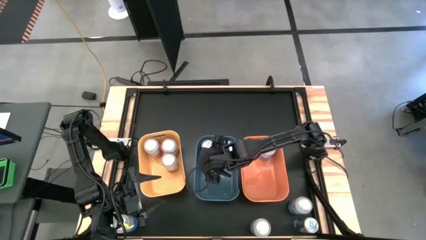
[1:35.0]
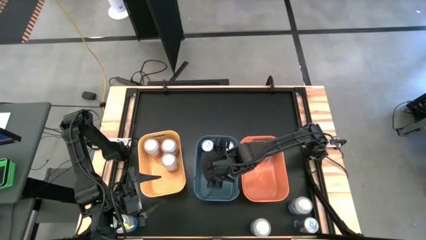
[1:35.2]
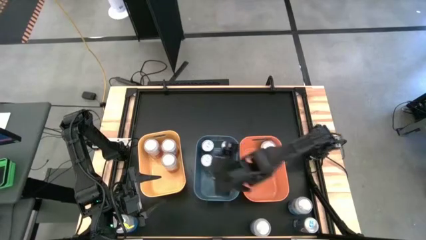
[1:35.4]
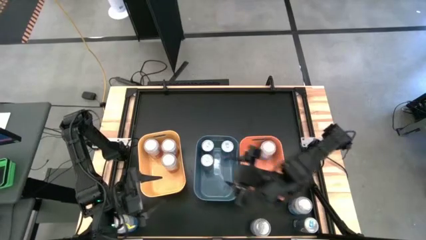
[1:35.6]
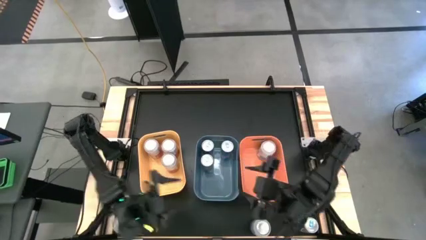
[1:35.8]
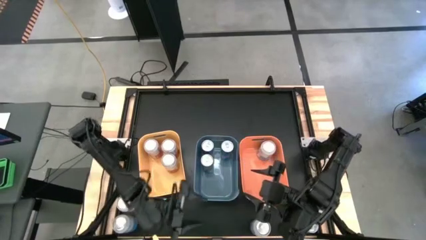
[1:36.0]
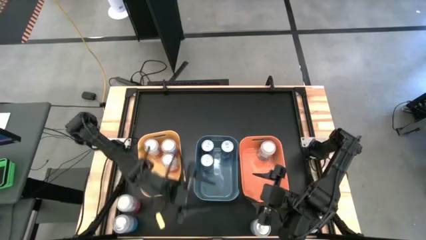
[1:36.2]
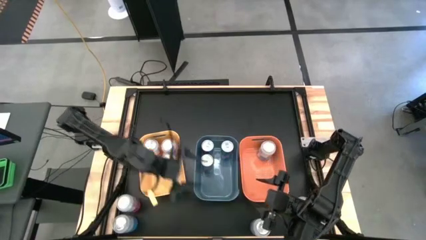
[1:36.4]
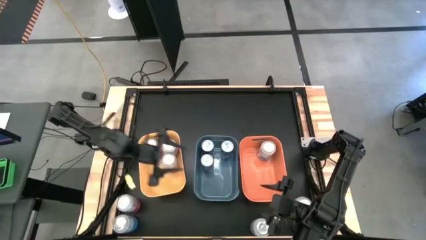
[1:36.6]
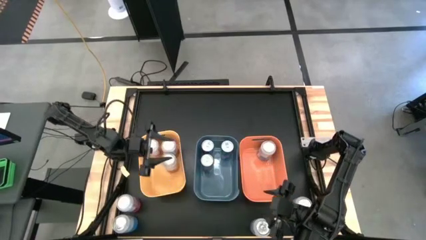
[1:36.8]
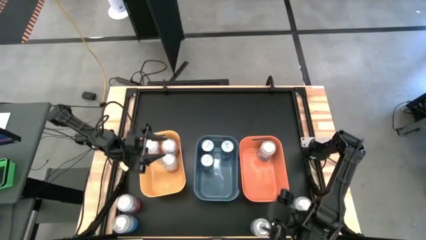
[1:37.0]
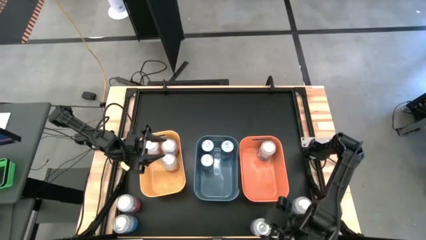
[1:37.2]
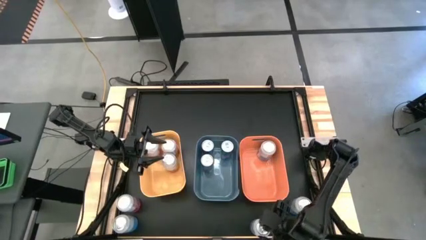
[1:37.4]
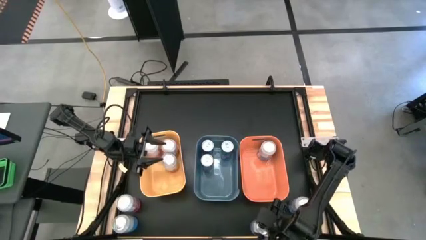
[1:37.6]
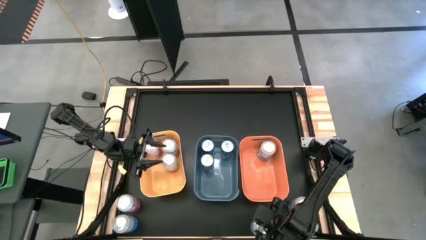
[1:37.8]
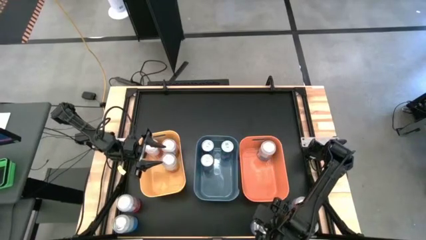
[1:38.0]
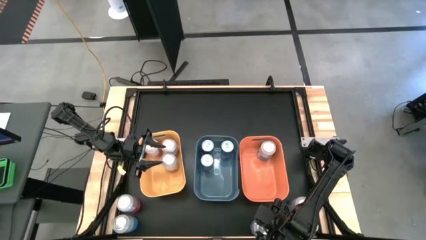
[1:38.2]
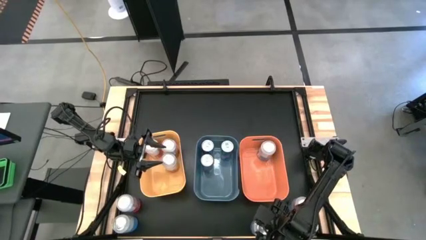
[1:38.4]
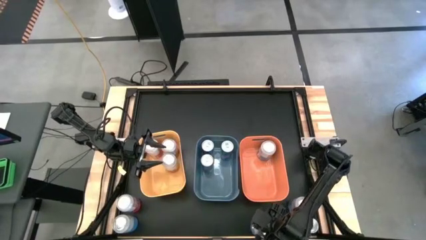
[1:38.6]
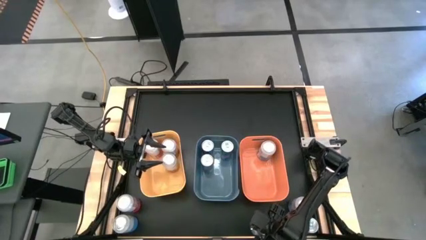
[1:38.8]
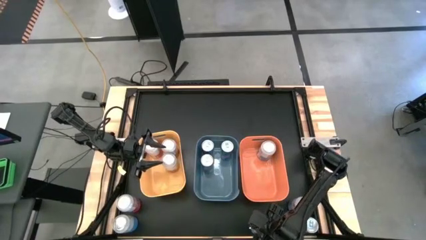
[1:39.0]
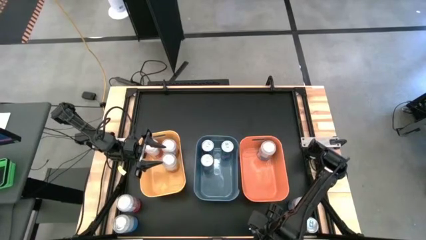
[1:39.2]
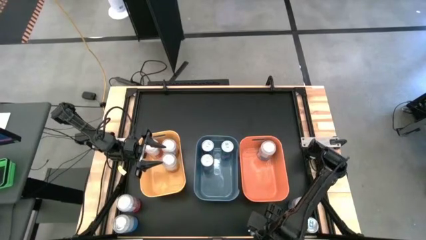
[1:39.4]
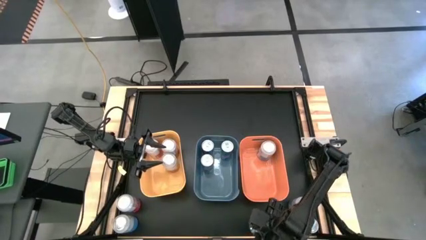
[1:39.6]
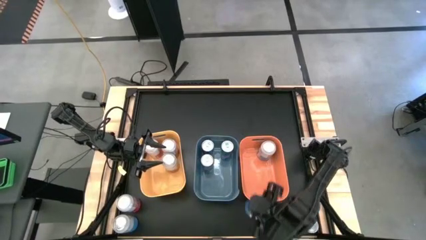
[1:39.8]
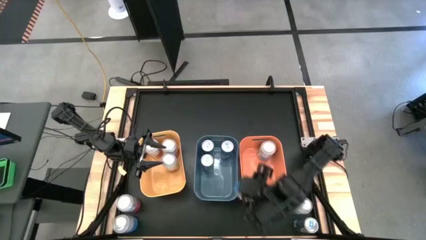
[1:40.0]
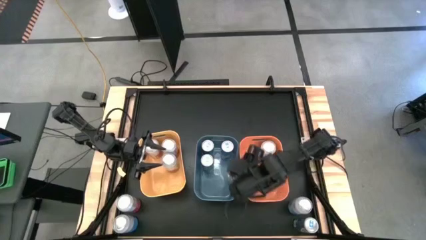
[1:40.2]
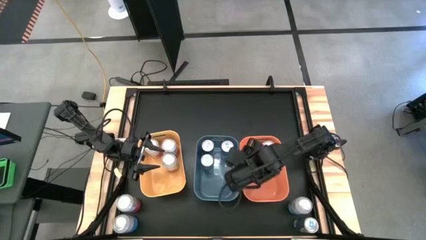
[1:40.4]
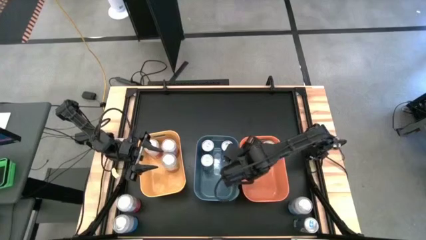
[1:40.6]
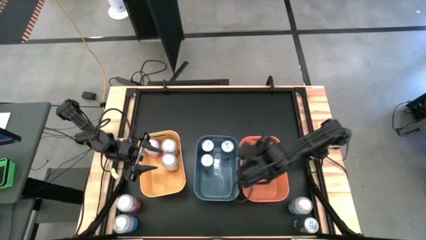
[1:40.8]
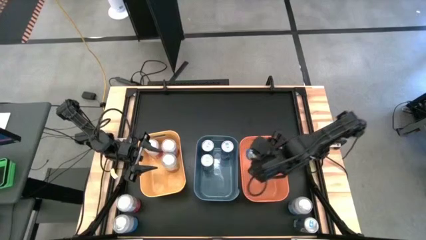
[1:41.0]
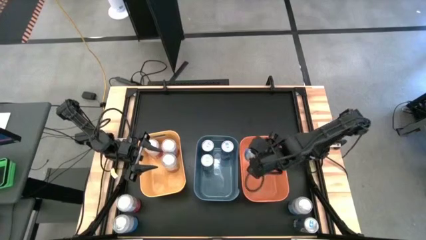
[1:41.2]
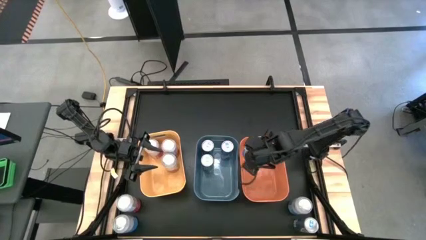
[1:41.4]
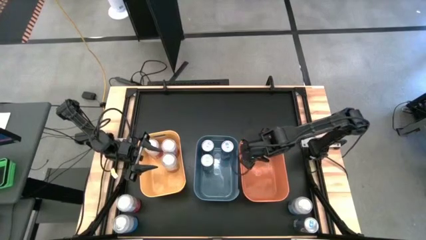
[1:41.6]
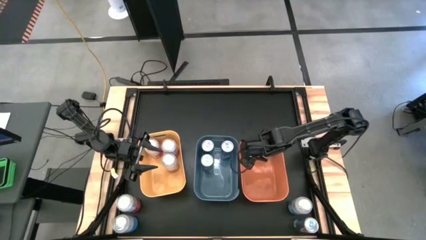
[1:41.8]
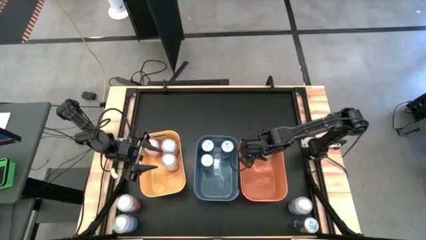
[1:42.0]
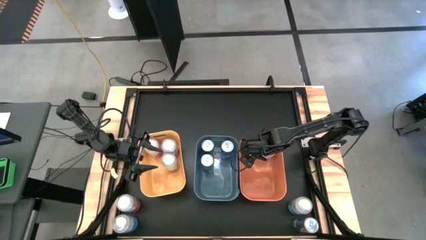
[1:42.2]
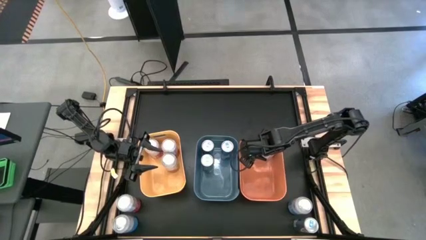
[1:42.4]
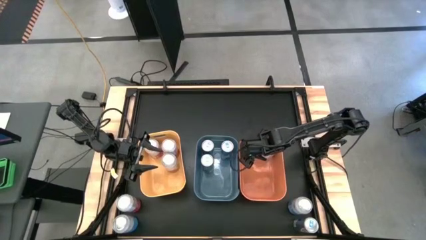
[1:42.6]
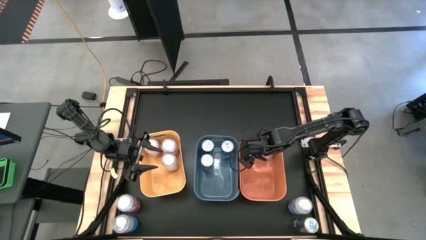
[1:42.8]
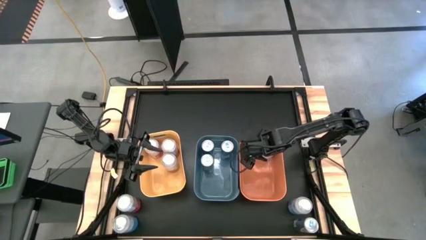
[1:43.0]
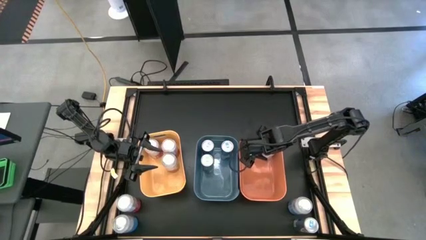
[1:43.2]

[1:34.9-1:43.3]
Task: Sort soda cans
Put the bottom right blue-white soda can into the orange bin

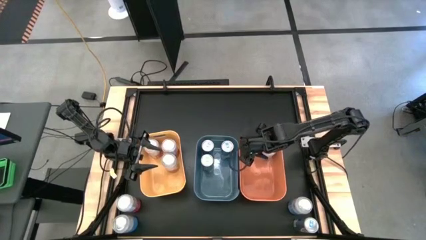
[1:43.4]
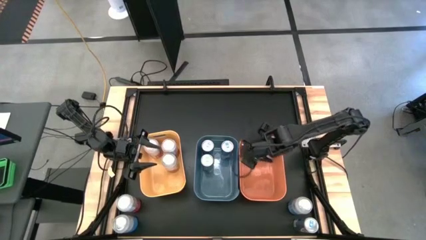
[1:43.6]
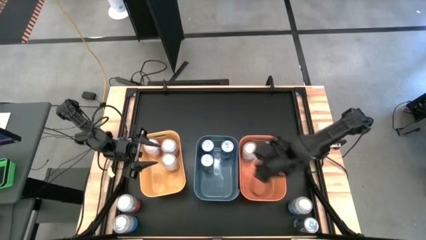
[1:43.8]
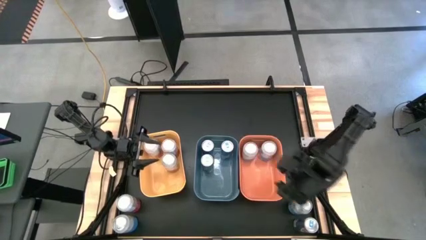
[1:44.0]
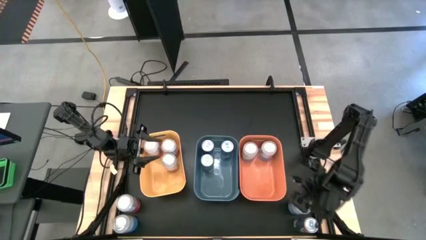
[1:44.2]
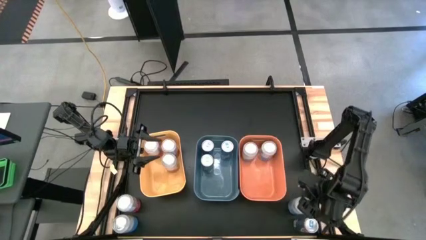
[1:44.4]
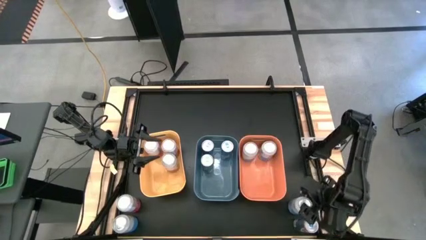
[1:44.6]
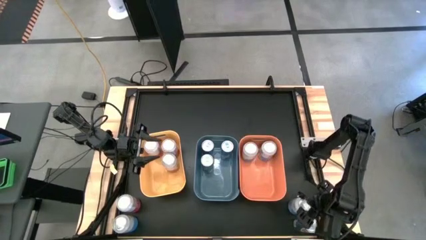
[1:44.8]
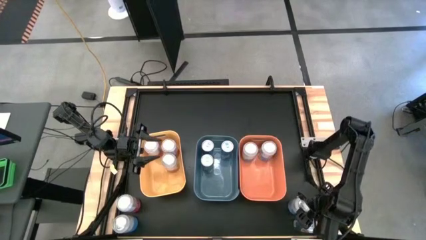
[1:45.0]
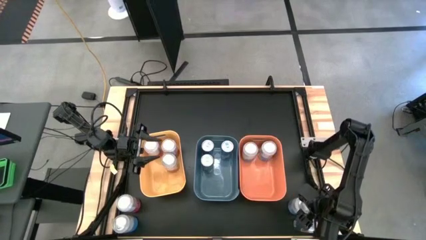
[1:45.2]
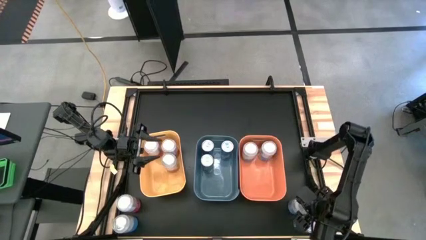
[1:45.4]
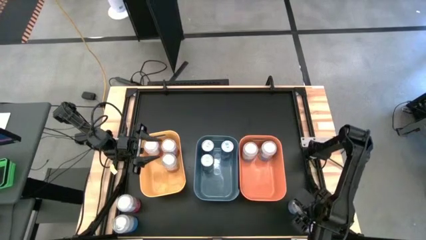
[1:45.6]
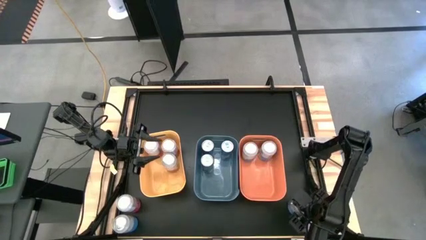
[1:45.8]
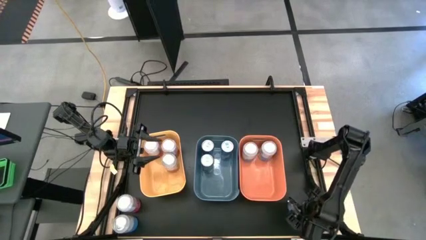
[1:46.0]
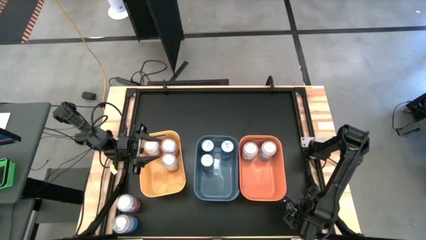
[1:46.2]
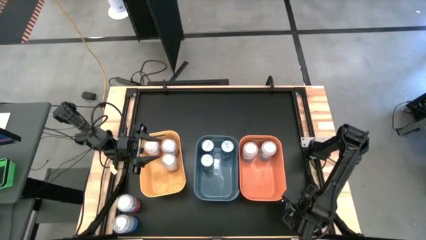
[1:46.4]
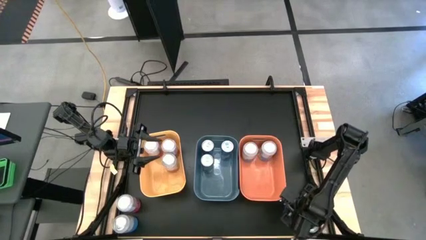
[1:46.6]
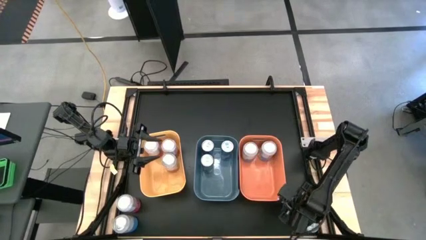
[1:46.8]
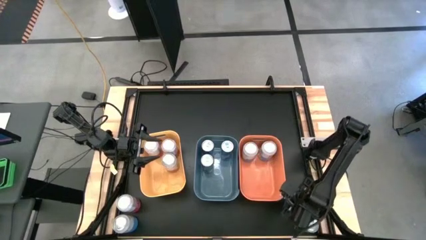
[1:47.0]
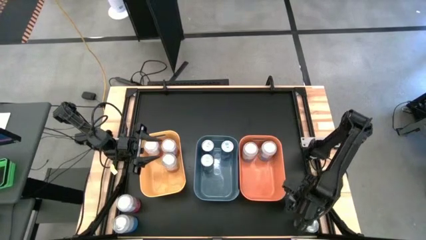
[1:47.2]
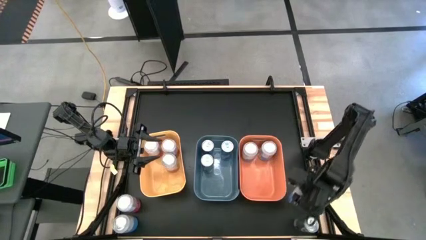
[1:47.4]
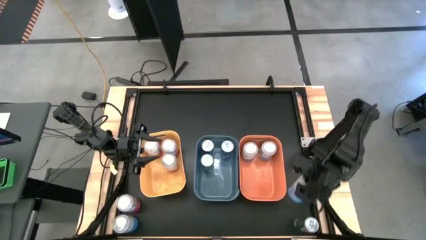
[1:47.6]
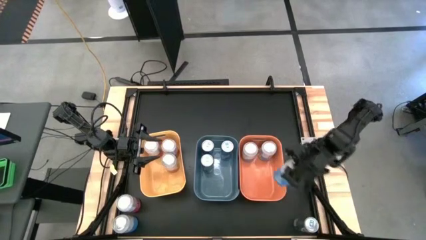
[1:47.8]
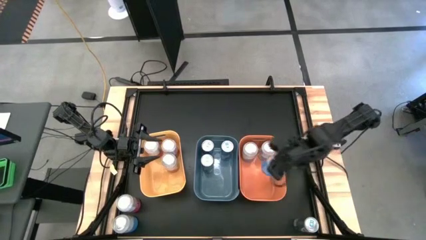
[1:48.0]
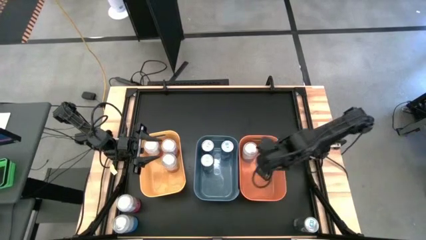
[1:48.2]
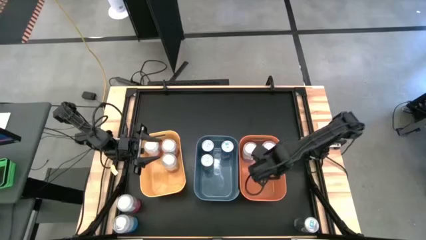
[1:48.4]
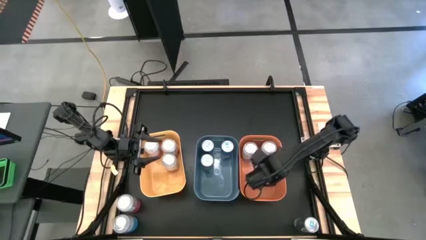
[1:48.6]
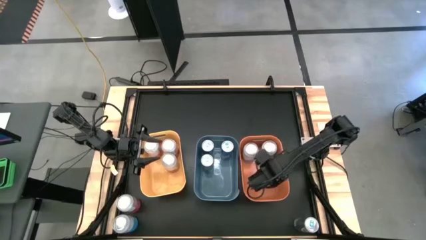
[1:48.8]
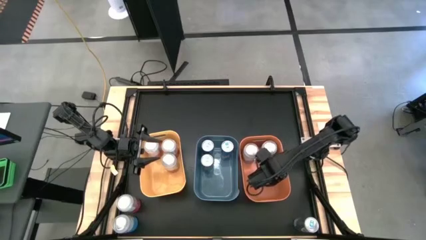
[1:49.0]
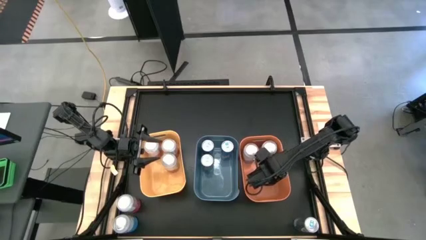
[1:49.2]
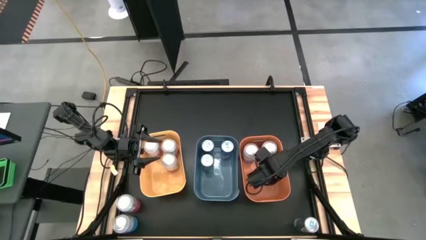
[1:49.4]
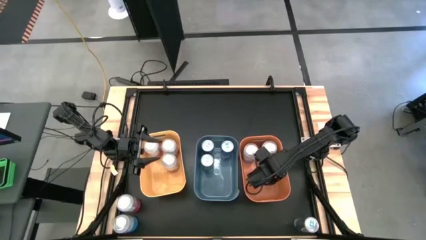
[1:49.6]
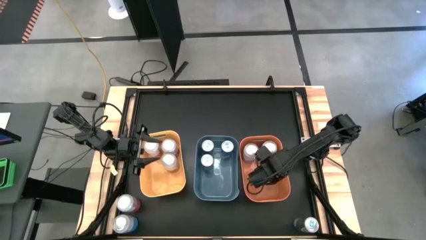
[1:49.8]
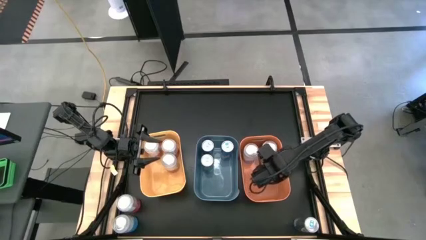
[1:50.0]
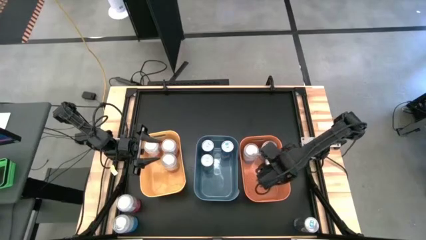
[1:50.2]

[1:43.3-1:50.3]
Put the top blue-white soda can into the orange bin
